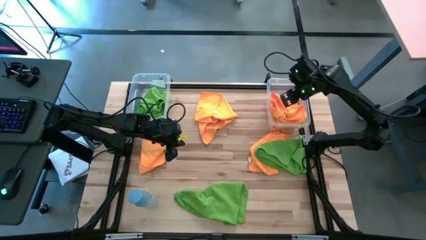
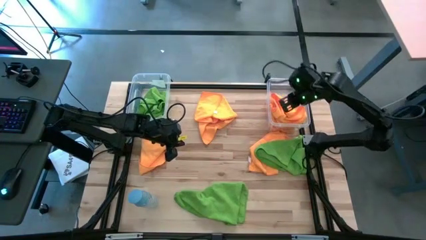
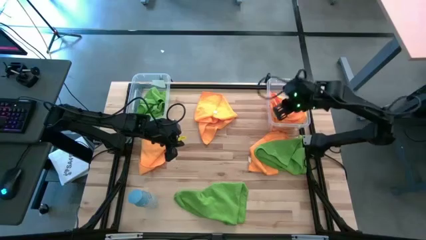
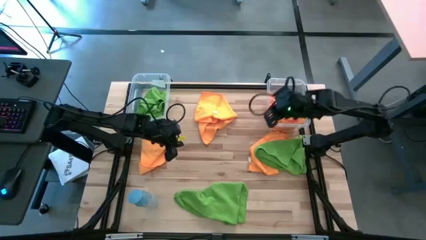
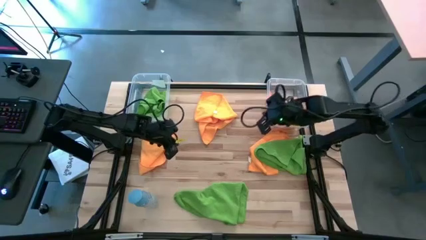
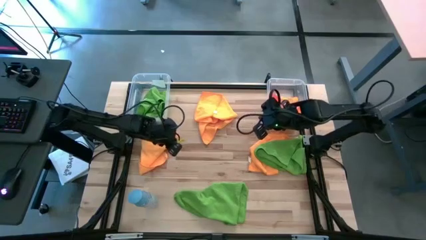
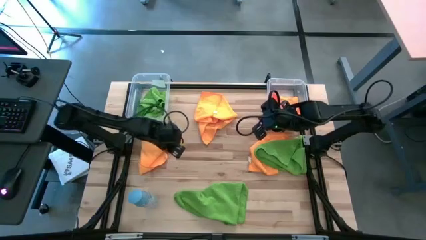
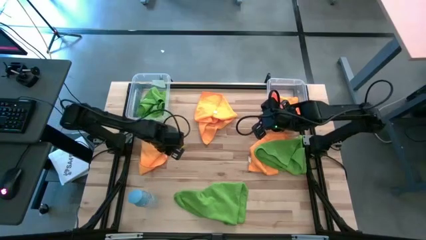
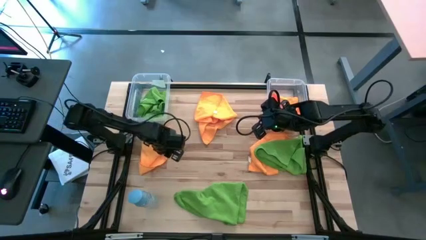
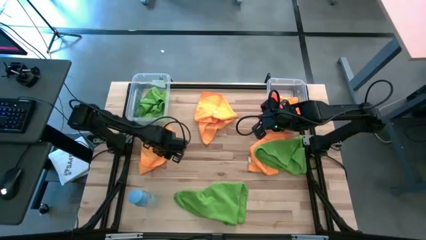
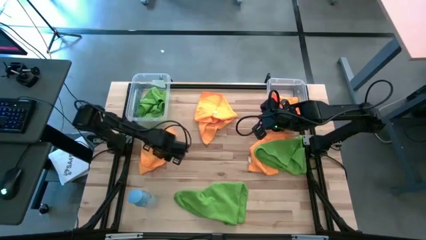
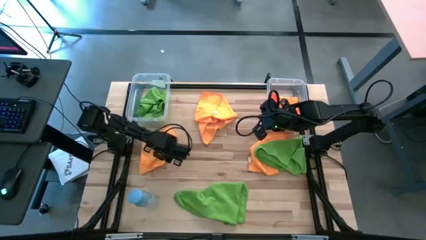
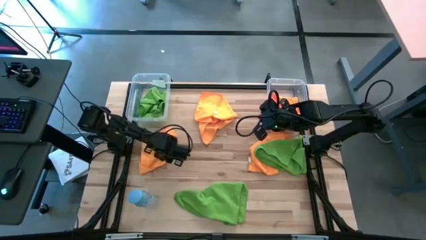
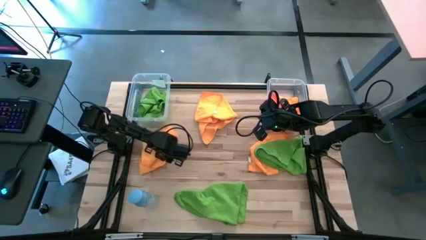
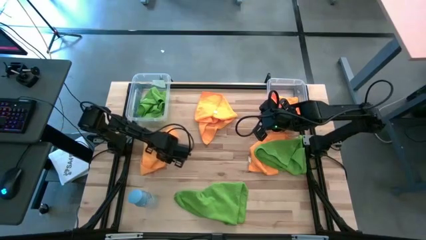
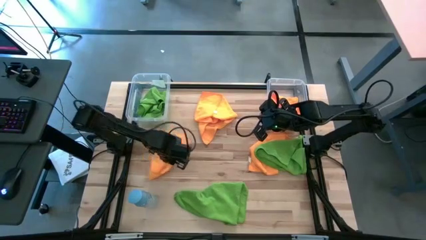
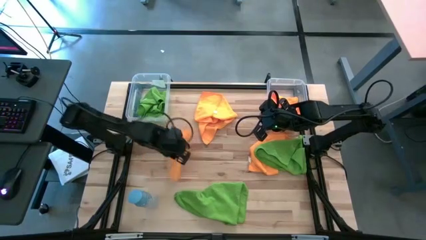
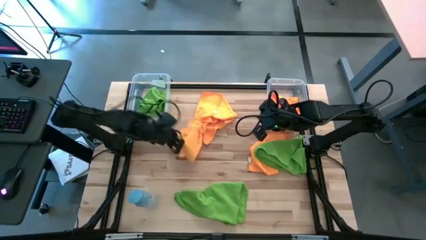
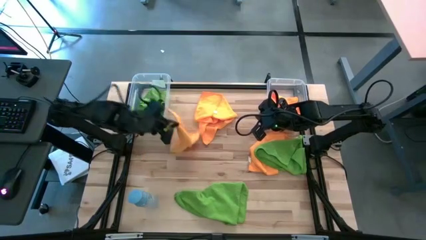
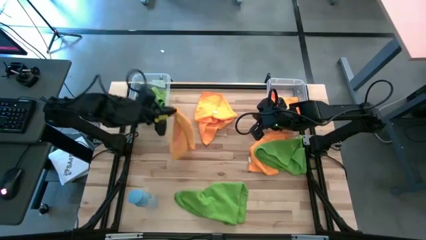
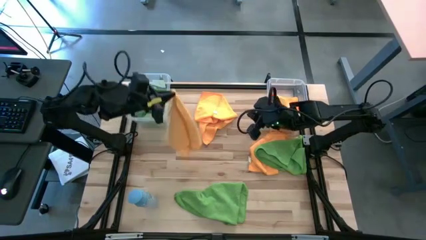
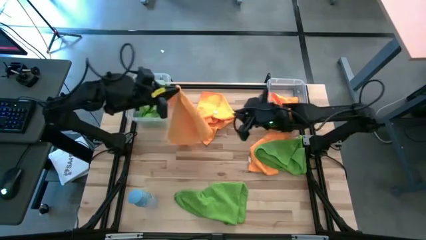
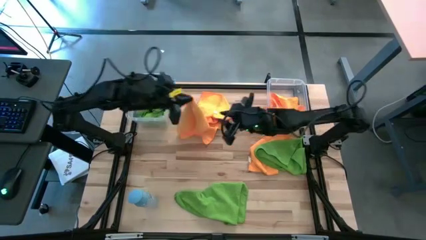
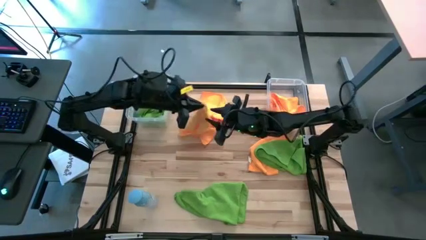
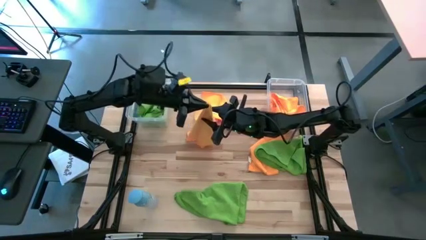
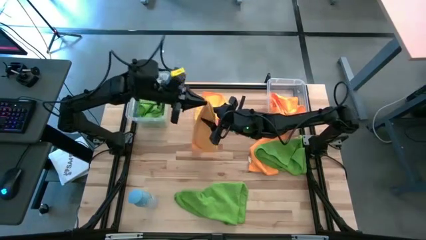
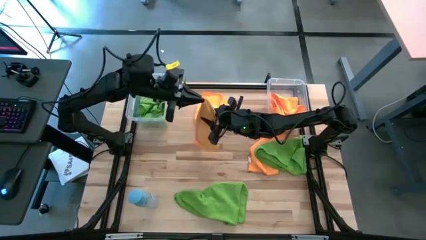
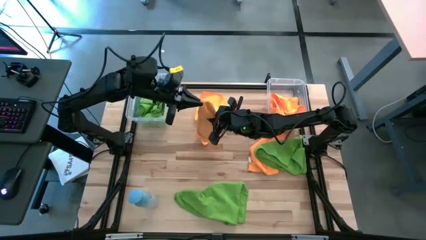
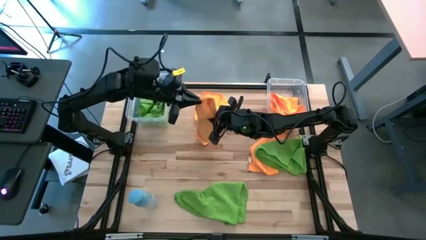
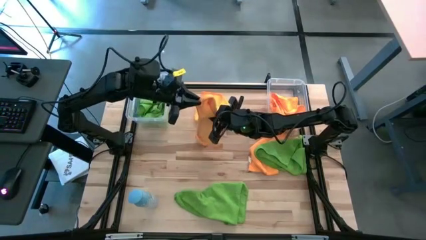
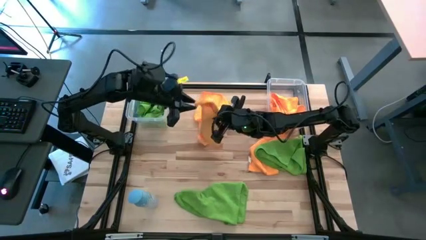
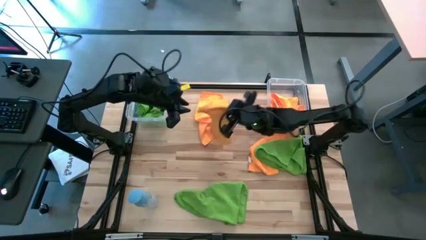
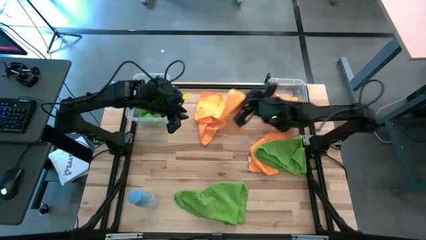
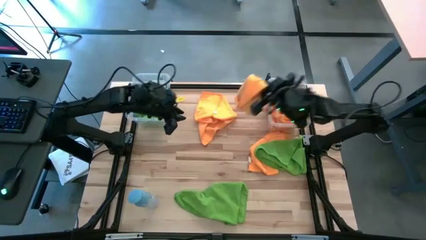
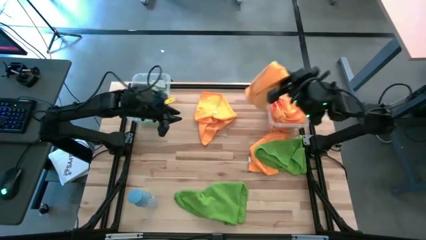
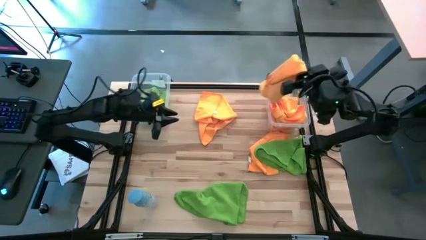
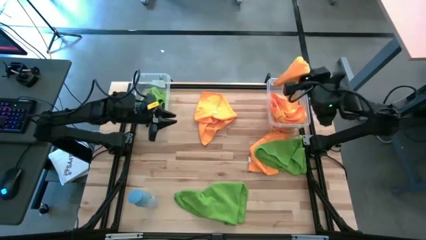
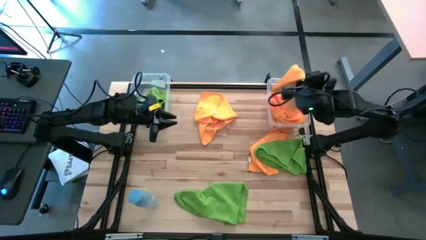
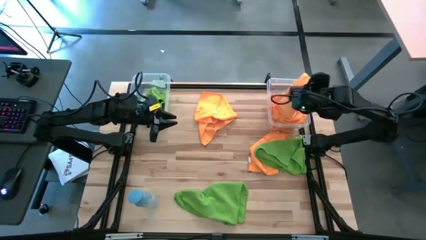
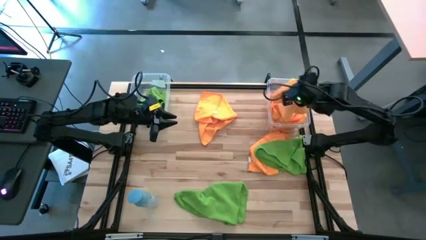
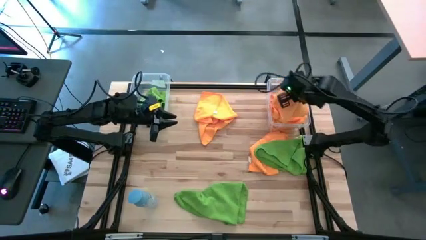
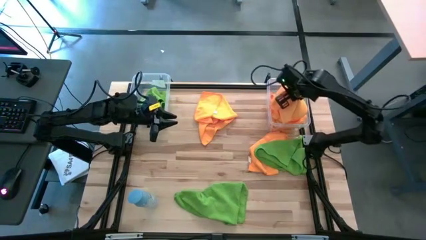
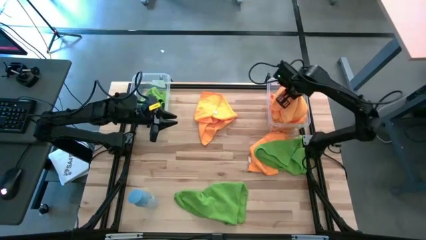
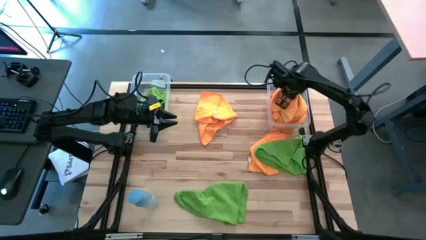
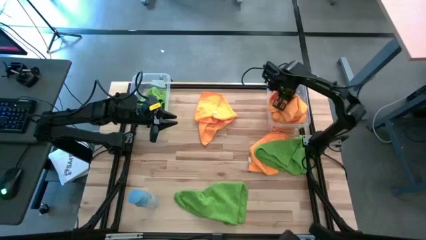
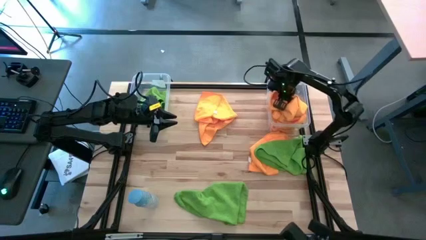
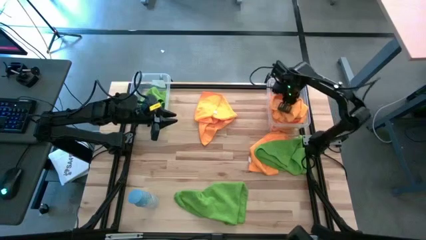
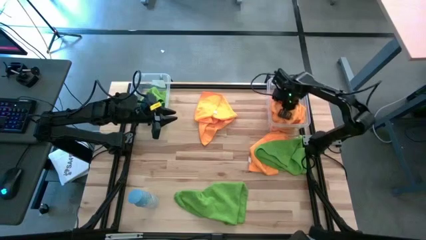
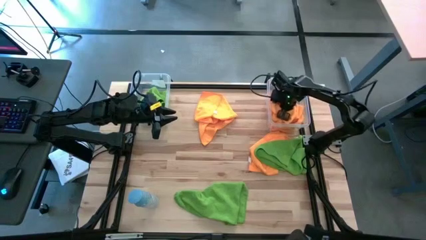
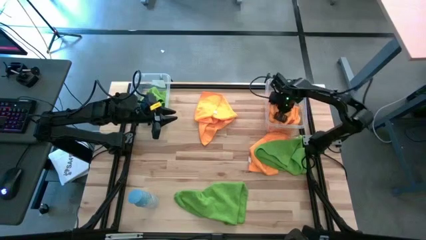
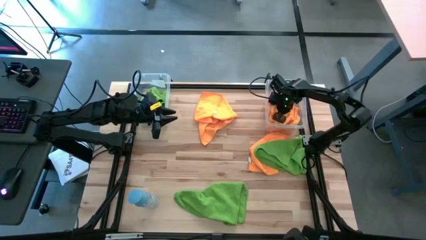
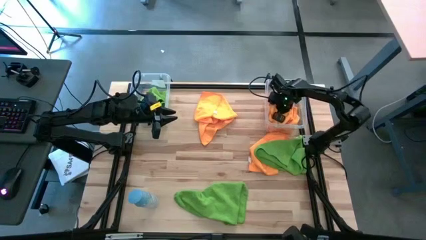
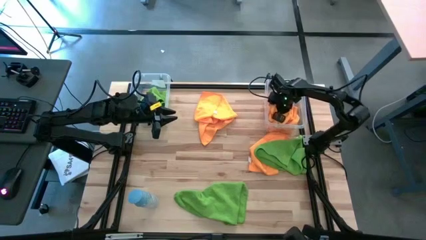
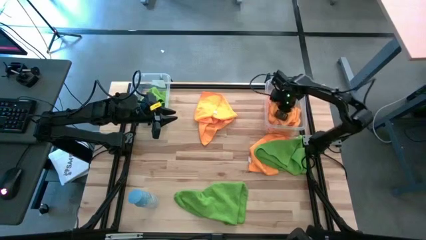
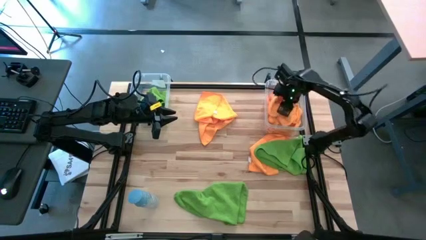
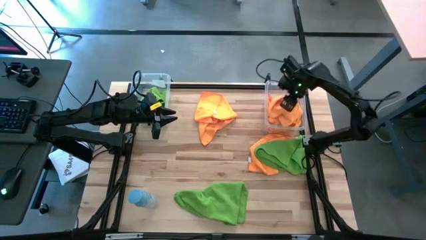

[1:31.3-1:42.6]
Task: Sort microfiber towel by color & place in baskets
Put the orange microfiber towel into the right transparent bin
